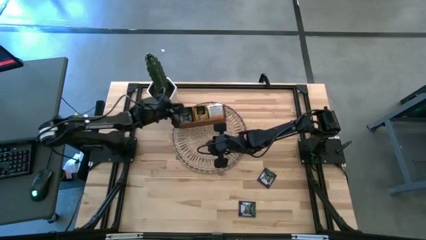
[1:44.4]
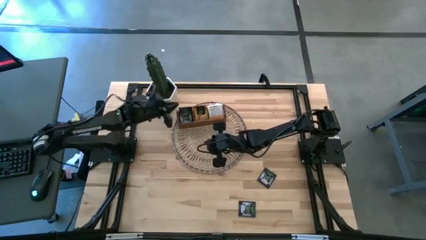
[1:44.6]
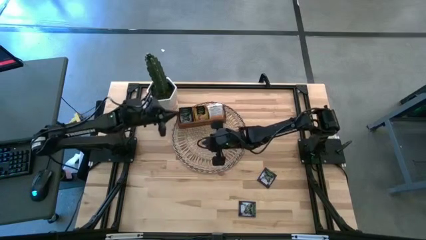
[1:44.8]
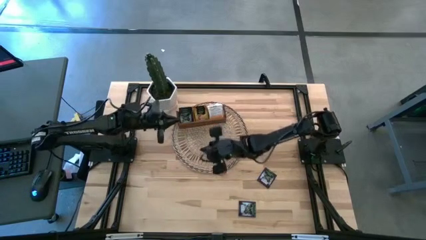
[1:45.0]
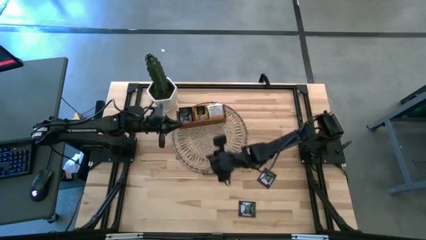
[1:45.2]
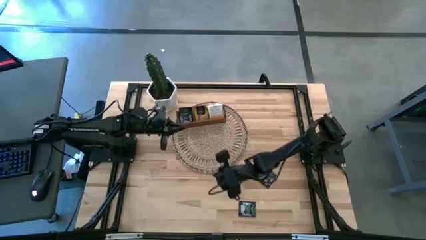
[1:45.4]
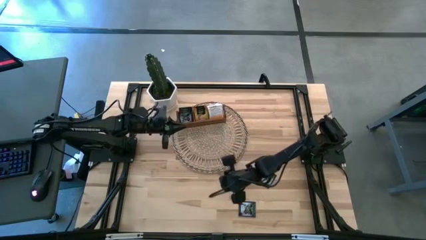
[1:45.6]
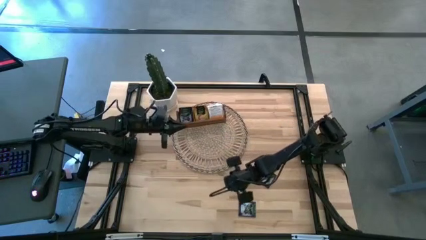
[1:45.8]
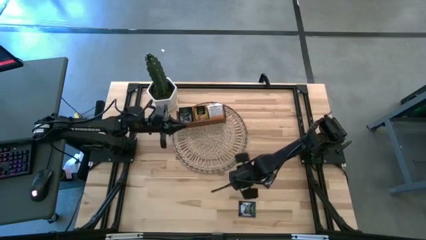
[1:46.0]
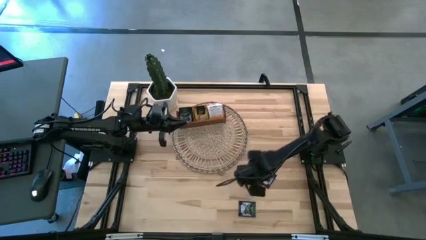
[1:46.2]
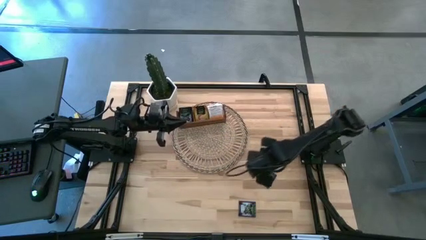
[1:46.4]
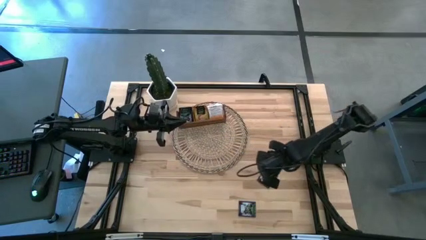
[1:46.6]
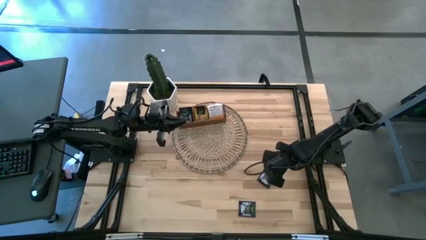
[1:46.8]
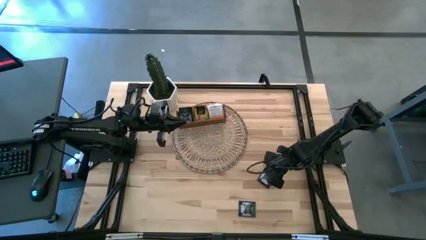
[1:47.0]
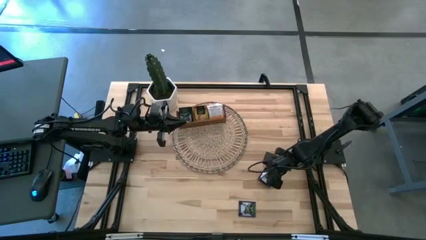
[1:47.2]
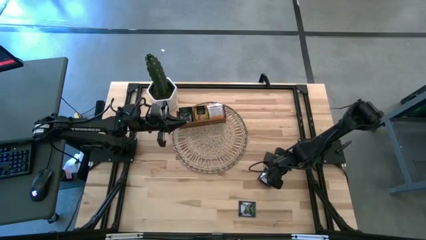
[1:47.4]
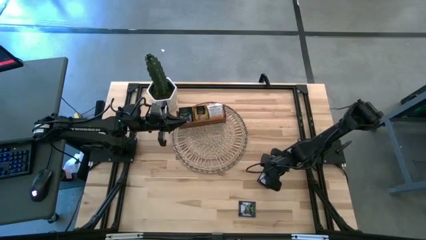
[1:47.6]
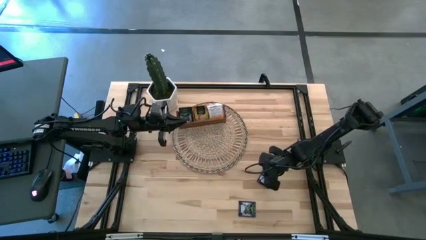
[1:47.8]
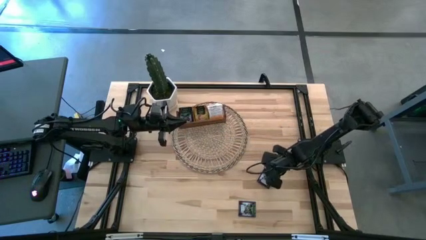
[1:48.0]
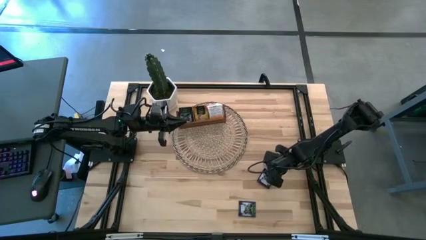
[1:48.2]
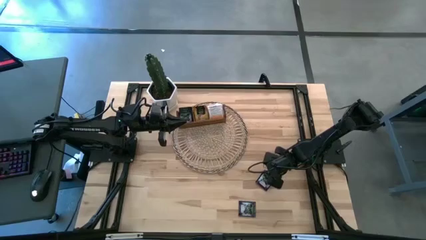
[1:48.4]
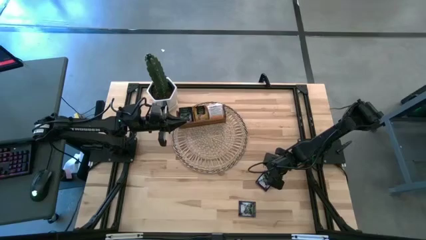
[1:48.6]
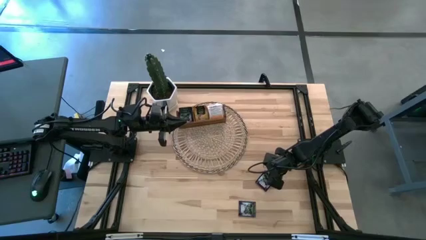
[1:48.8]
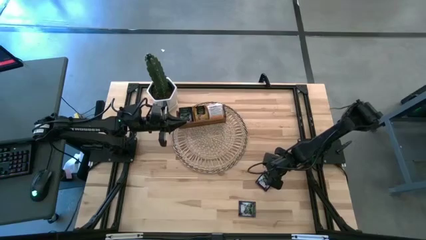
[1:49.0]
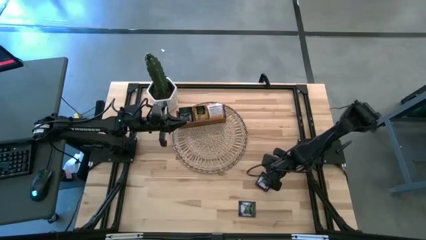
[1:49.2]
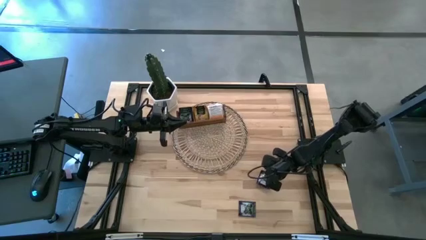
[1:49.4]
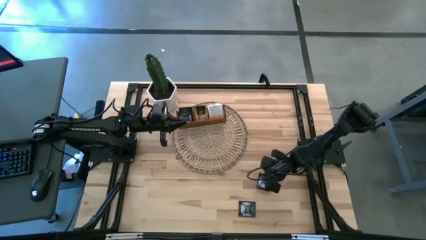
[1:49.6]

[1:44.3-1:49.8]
Task: Pick & Place Tea
Put the black tea bag into the left section of the wooden organizer

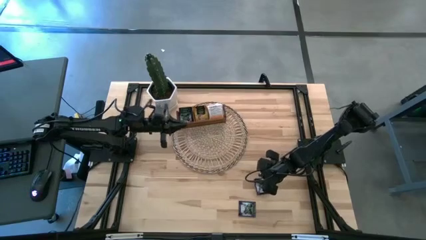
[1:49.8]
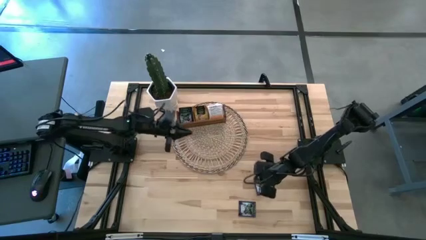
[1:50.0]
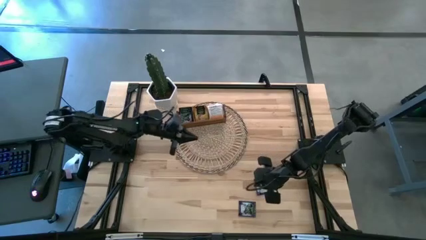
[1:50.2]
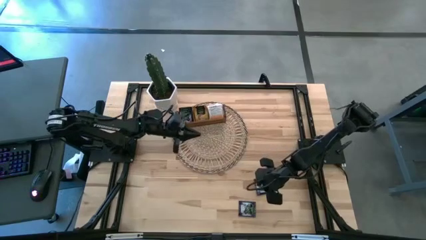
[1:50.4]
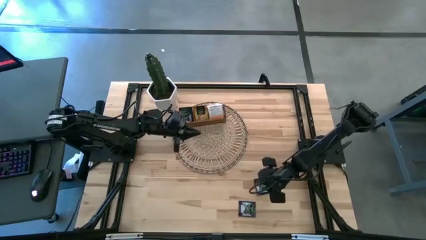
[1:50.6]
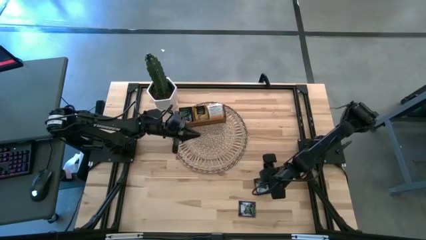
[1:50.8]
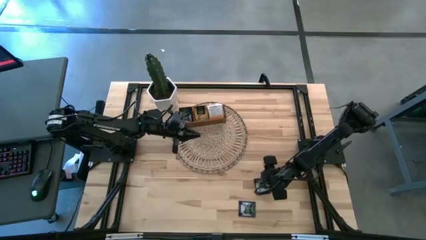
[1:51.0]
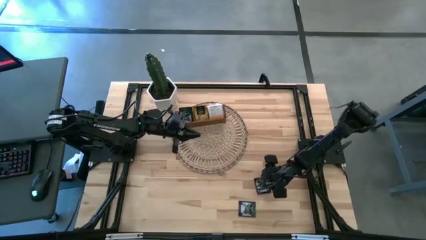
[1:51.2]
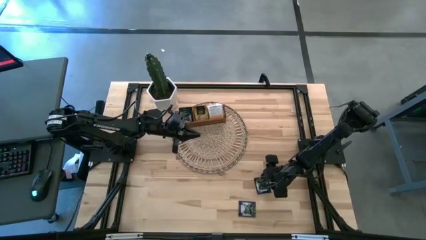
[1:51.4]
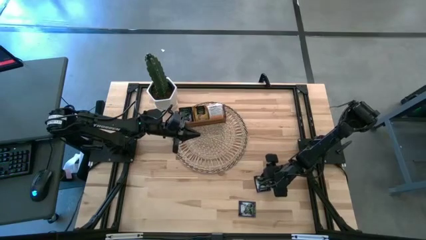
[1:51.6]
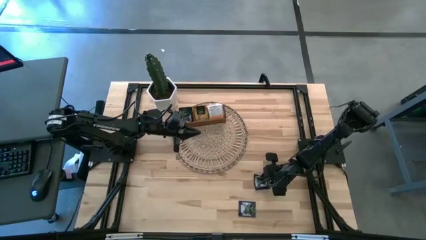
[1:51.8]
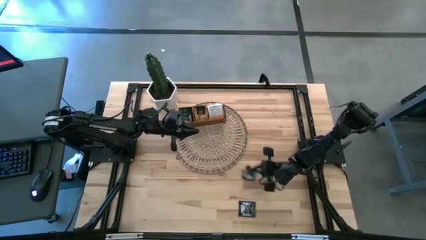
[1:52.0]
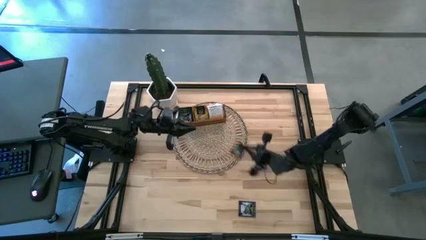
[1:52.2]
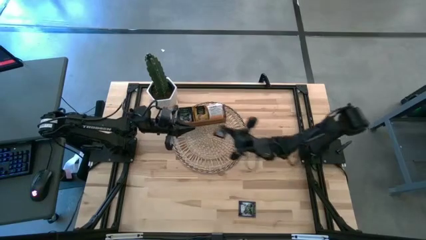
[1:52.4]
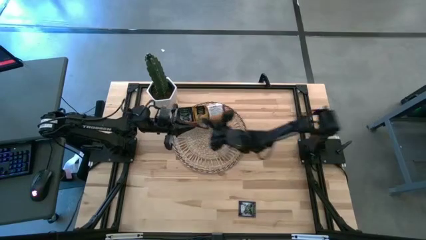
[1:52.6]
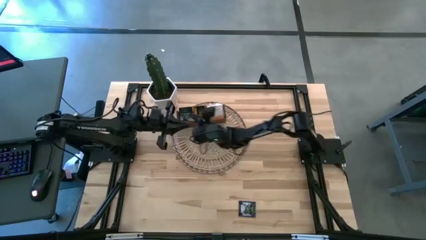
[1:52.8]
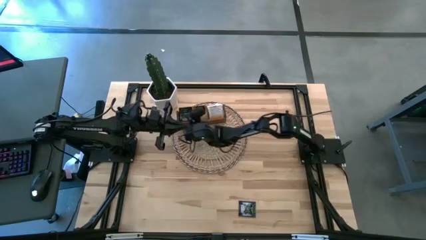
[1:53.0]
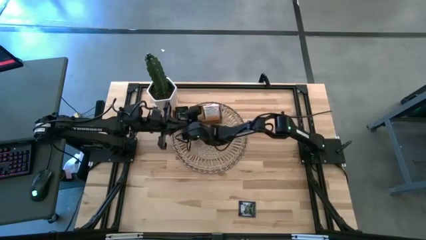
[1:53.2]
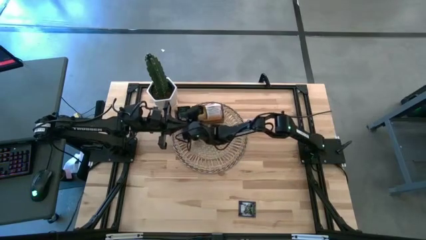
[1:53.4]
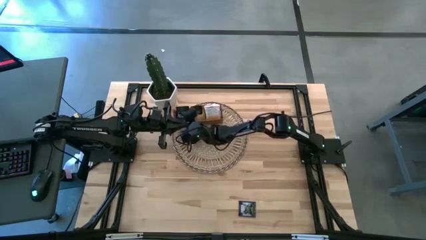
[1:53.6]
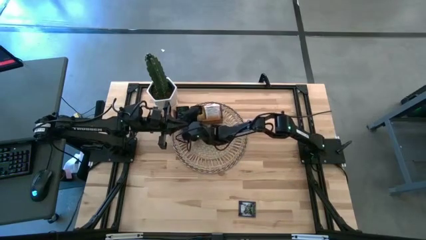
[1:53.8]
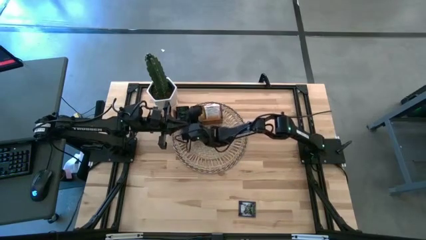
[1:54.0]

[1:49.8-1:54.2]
Put the black tea bag into the left section of the wooden organizer

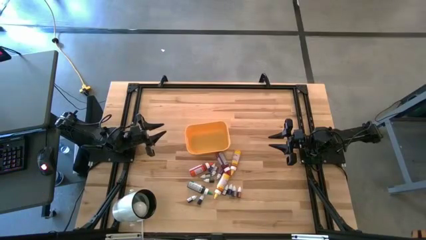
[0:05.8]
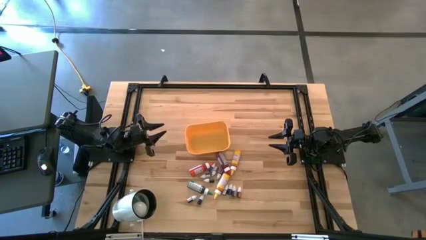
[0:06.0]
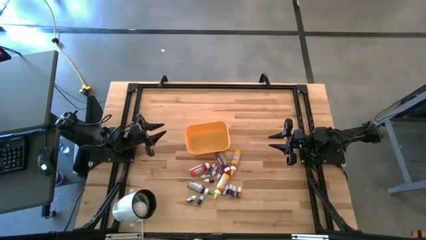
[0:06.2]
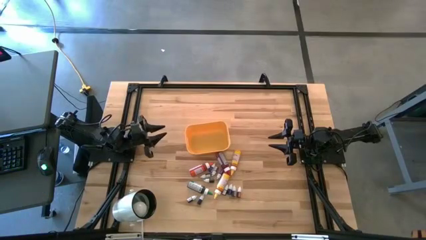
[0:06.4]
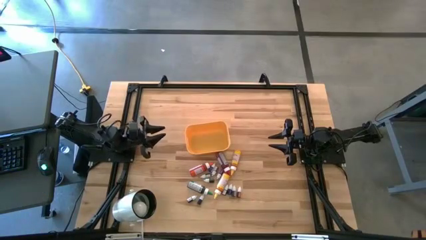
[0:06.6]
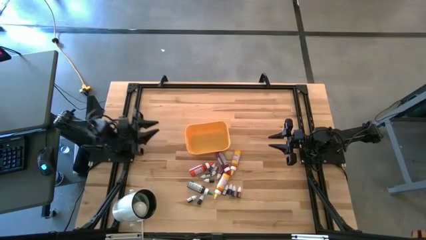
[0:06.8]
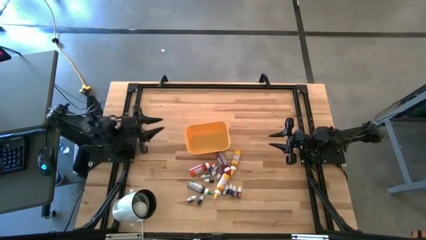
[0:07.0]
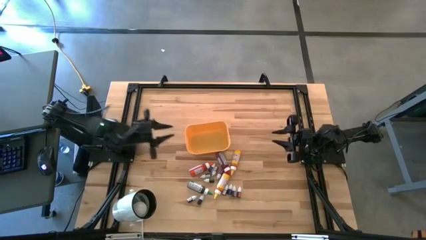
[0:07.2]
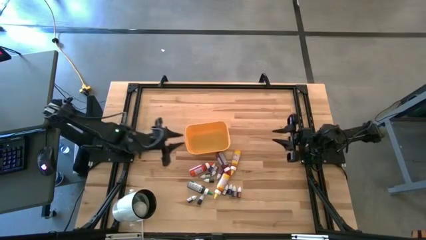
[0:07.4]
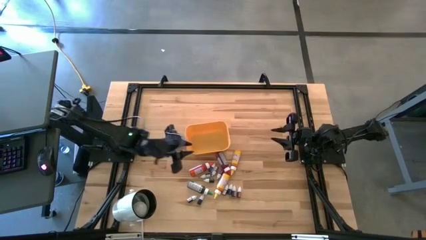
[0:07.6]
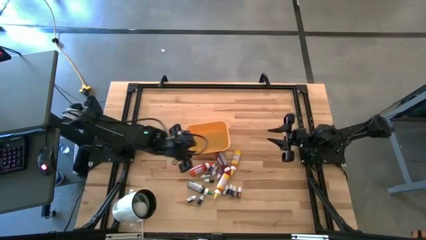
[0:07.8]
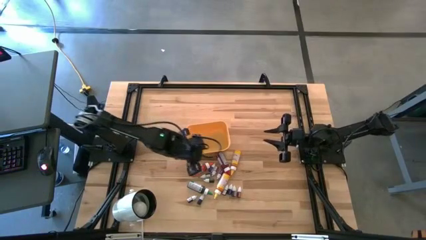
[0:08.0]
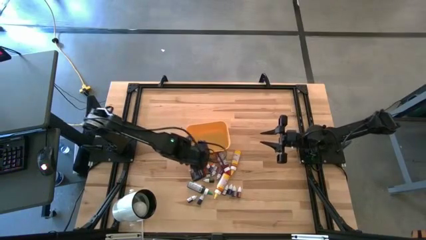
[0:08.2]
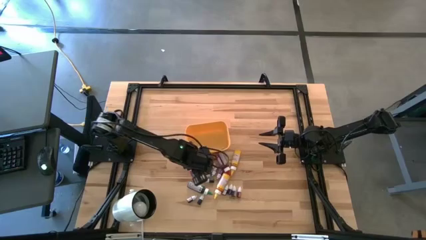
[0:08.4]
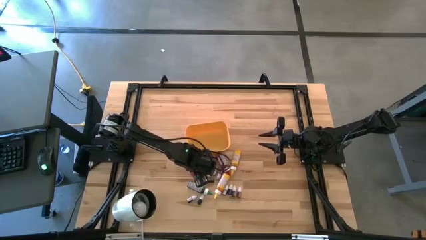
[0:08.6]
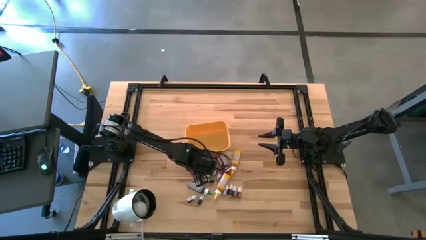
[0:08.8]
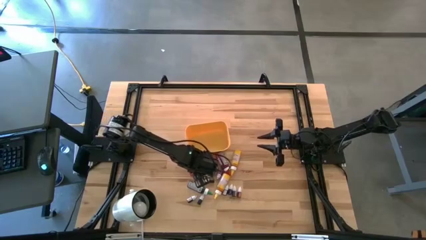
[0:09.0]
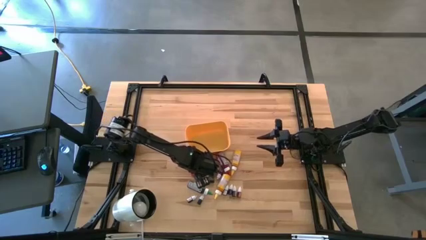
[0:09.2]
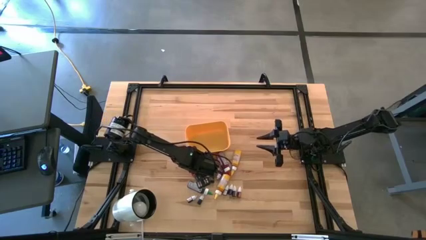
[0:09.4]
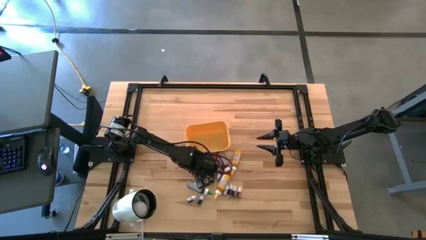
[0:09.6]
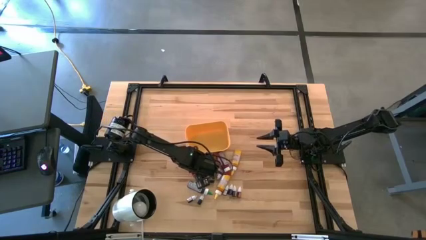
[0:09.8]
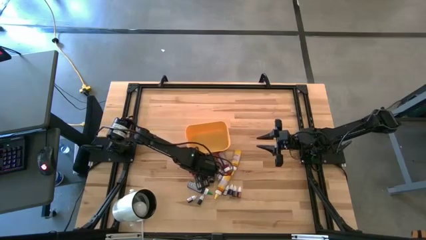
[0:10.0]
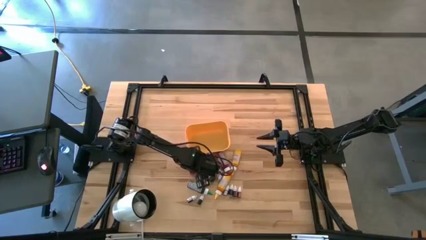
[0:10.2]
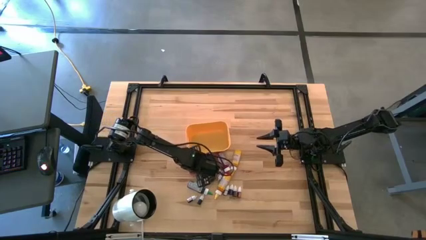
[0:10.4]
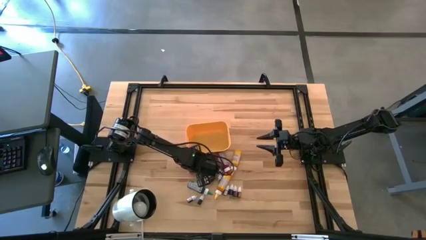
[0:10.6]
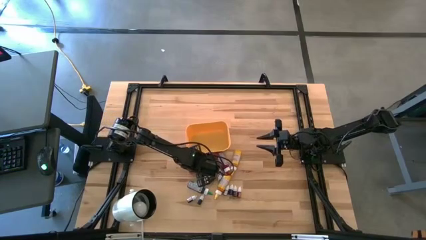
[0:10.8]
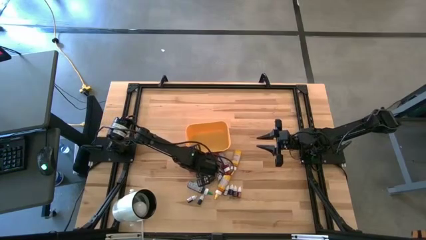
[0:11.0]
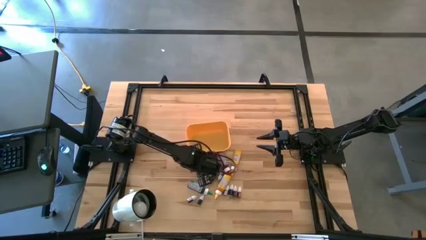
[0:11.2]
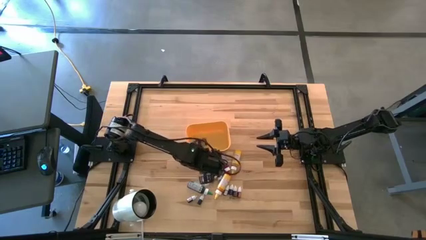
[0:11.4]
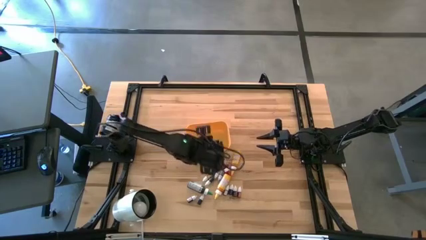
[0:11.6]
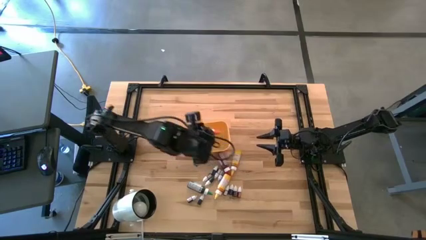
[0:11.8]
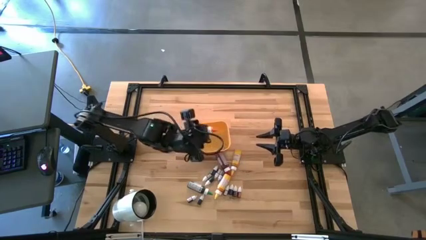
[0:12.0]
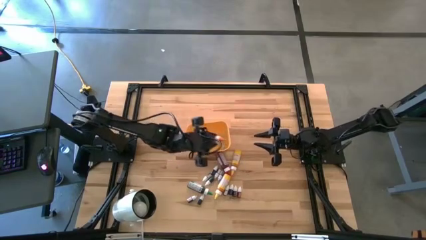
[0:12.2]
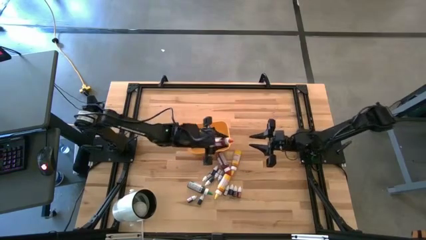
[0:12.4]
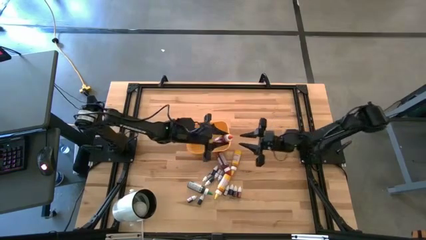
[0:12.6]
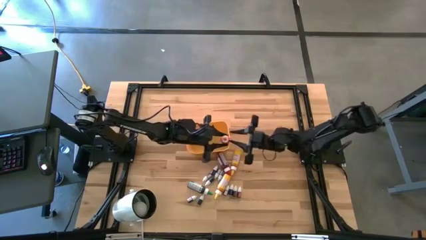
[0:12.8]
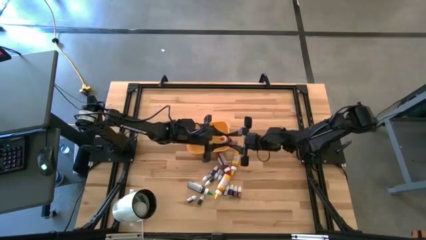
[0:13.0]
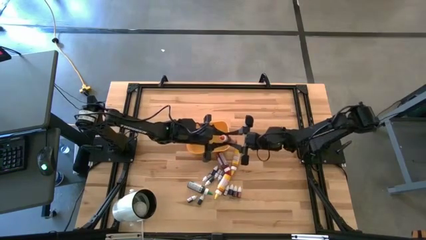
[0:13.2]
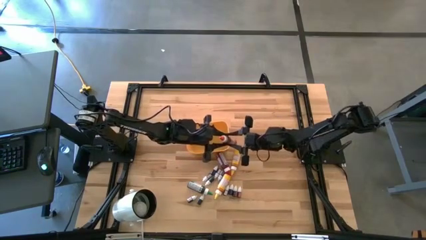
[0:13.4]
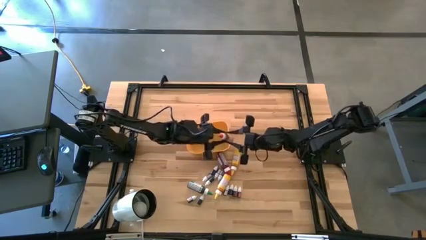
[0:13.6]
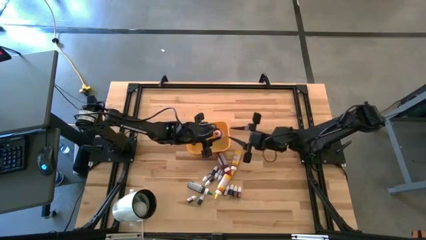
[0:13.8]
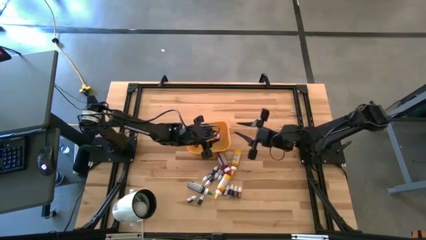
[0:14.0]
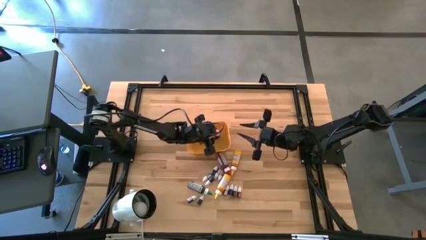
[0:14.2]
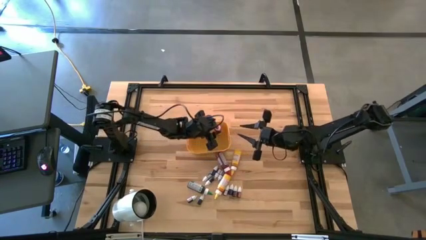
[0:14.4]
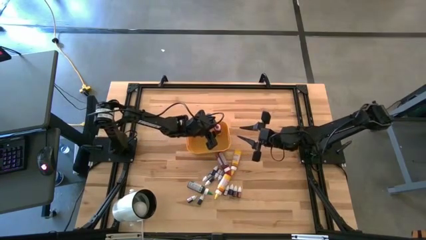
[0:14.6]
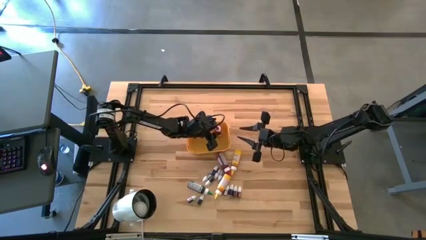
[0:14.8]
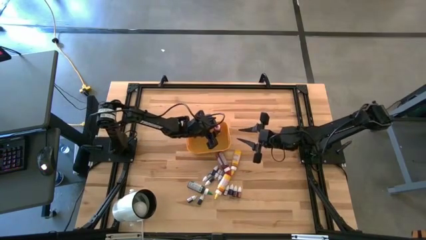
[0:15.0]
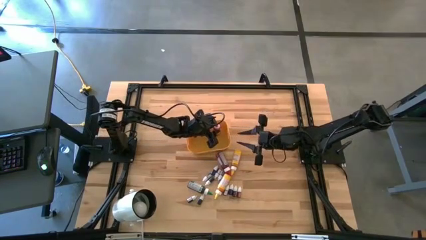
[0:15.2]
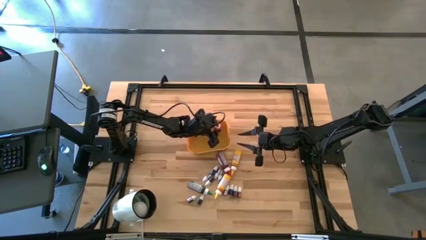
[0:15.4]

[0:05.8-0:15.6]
Task: Pick & Place food coloring
Put the large orange food coloring bottle into the yellow bin
